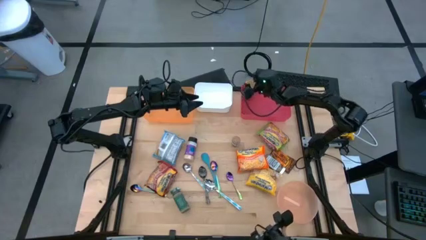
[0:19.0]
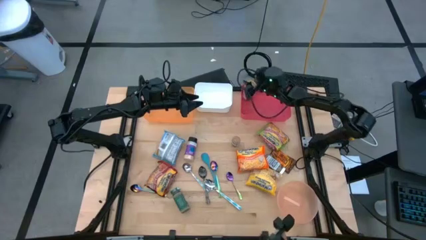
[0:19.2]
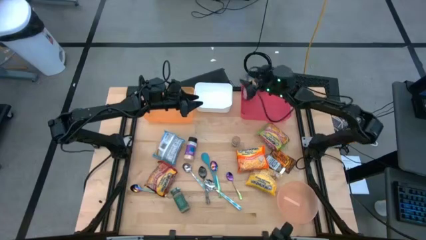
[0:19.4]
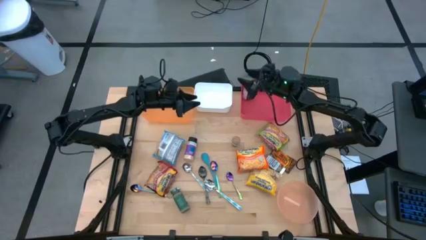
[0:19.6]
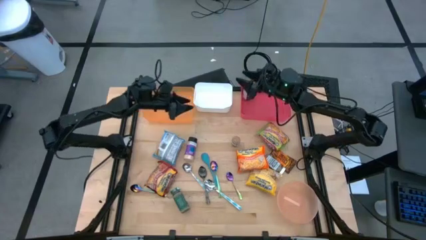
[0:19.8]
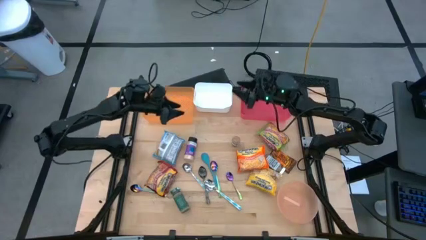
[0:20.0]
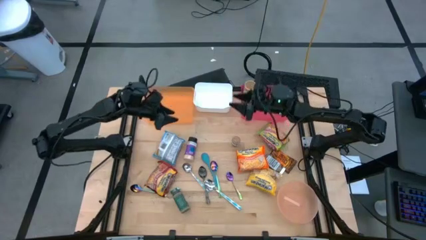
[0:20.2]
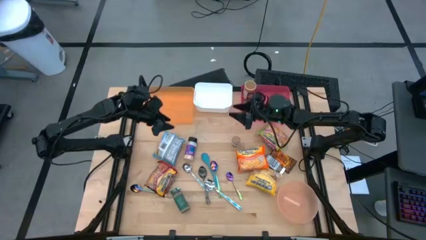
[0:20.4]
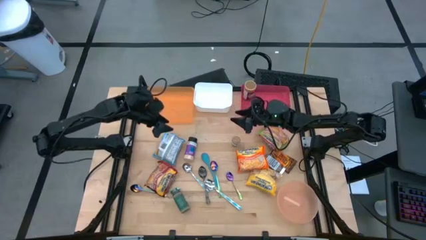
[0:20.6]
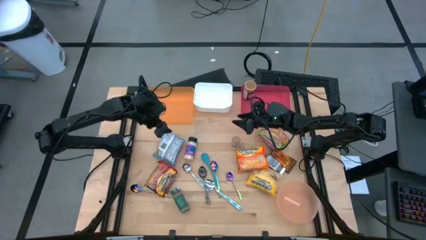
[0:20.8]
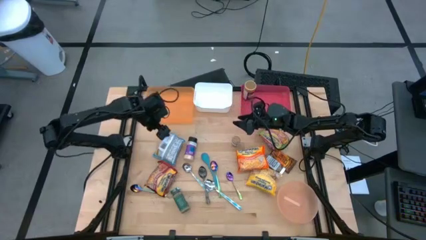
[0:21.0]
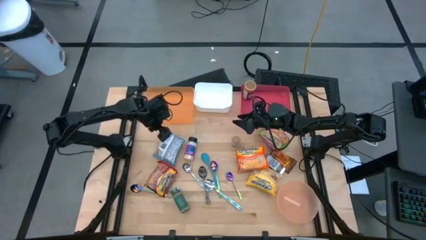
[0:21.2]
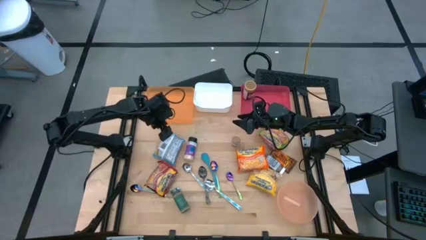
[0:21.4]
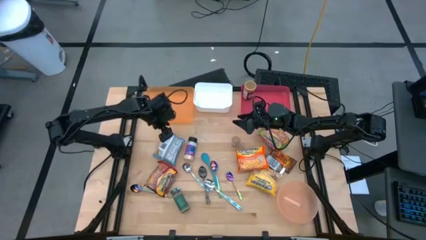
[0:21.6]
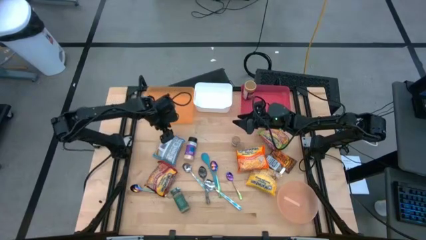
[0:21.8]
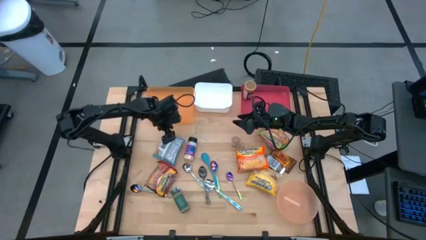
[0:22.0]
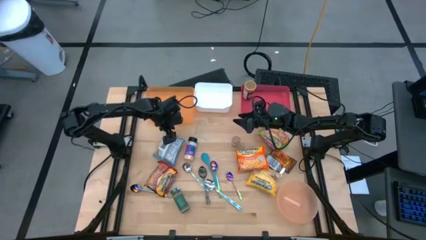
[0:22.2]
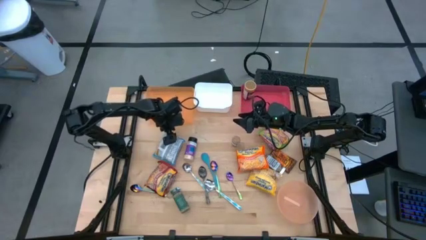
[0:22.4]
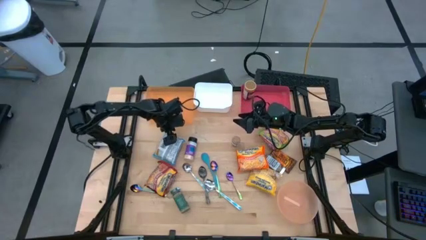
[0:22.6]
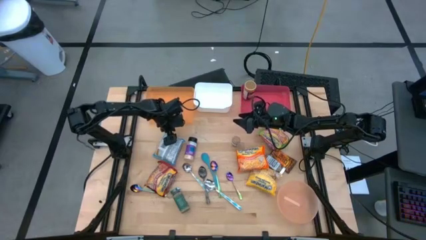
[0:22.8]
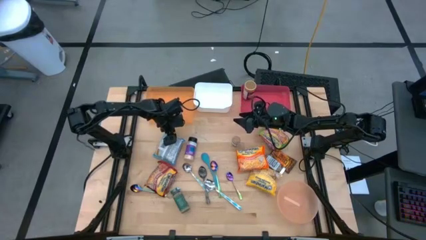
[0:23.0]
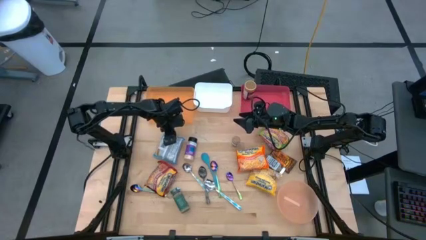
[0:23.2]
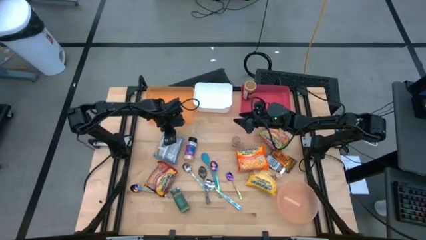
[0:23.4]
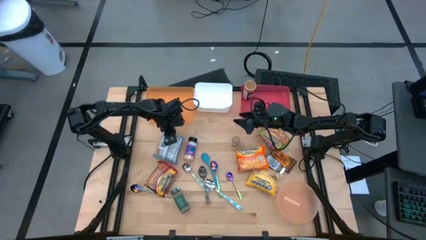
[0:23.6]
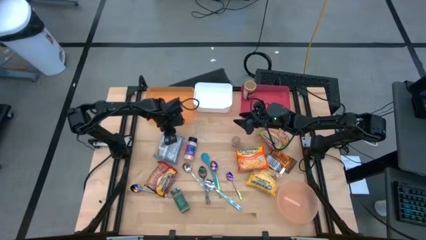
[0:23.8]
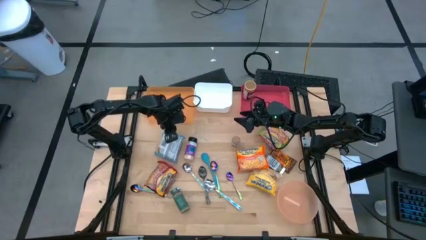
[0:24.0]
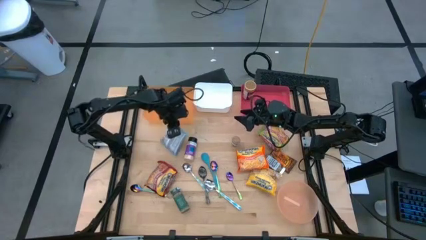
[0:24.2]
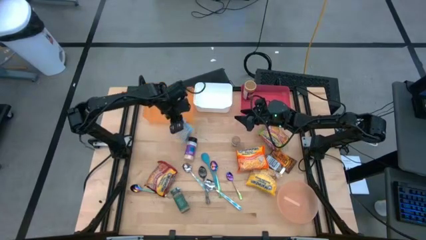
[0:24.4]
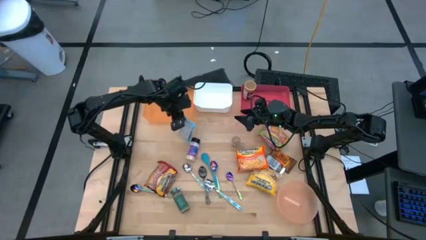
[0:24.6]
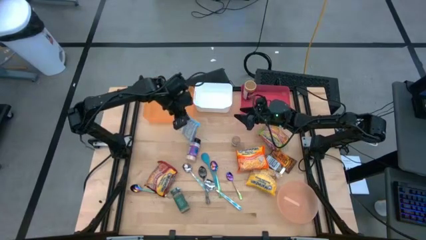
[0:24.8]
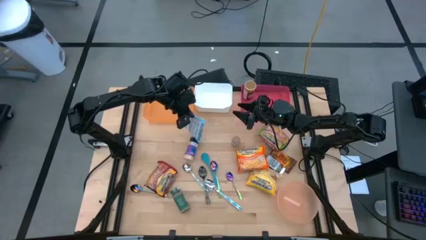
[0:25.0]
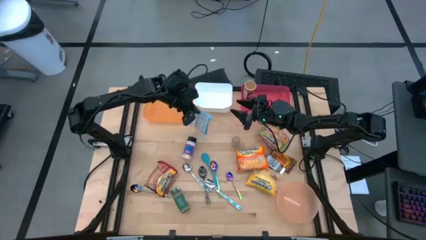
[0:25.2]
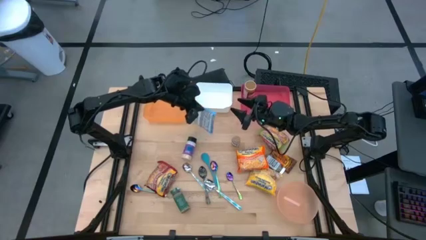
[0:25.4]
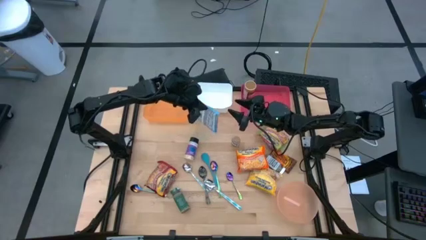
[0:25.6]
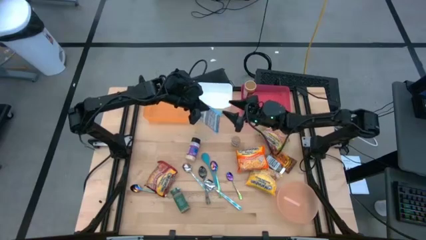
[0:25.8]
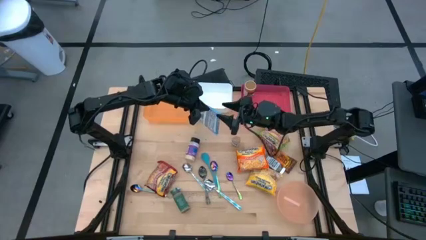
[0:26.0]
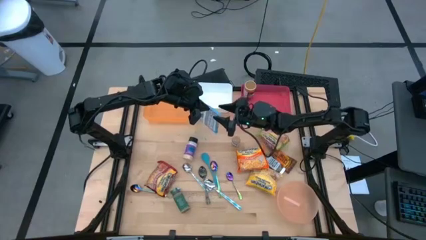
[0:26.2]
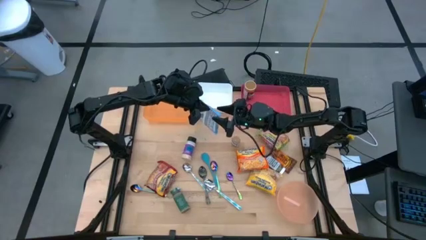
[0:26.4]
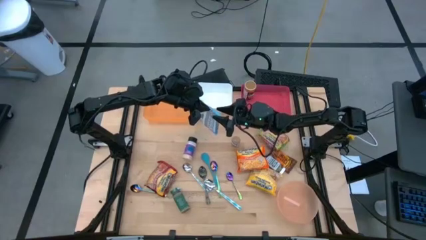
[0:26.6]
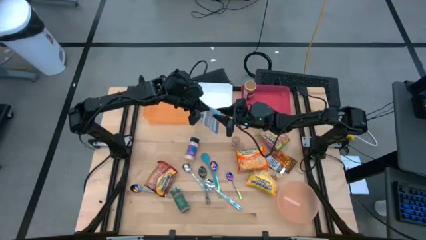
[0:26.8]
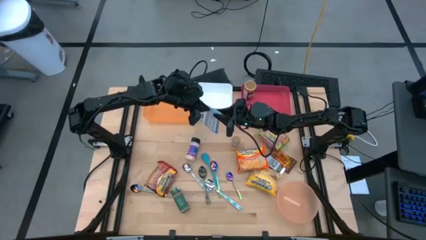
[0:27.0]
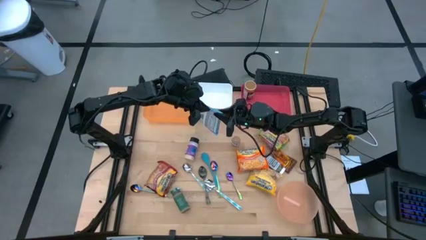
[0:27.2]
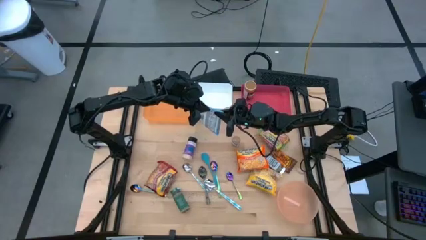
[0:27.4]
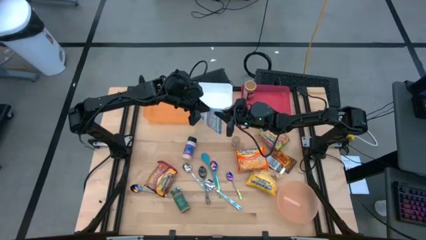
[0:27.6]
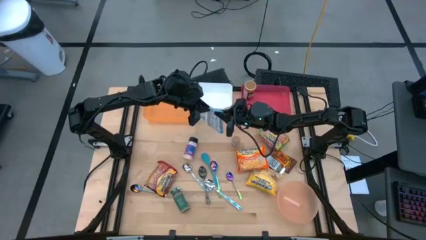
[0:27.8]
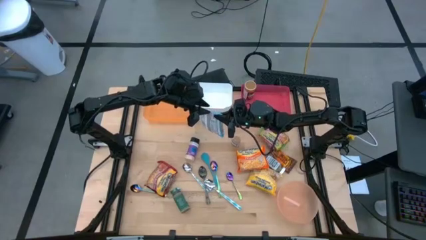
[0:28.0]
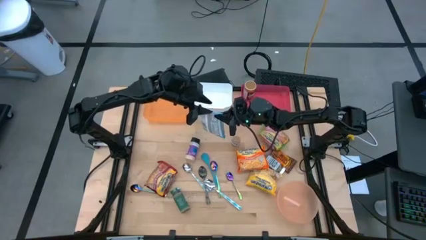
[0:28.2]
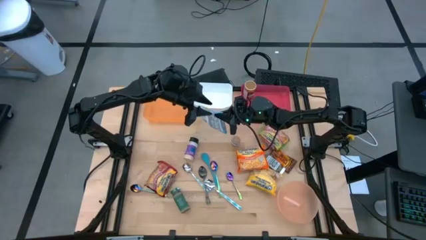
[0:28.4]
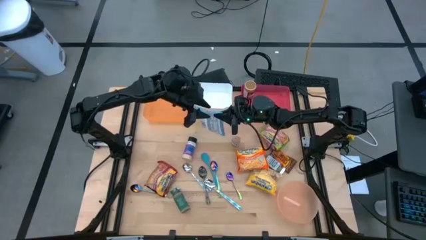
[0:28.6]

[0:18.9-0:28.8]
Task: Pick & Place Food Item
Put the blue noodle pack into the white bin
